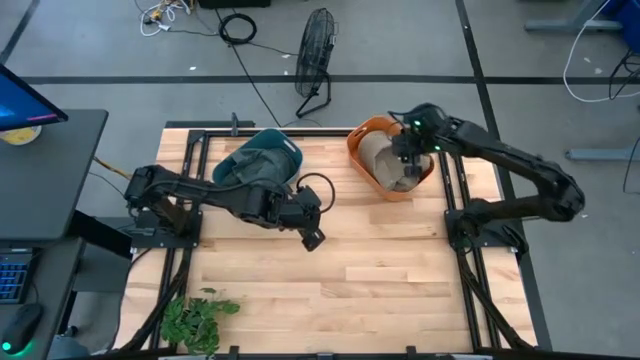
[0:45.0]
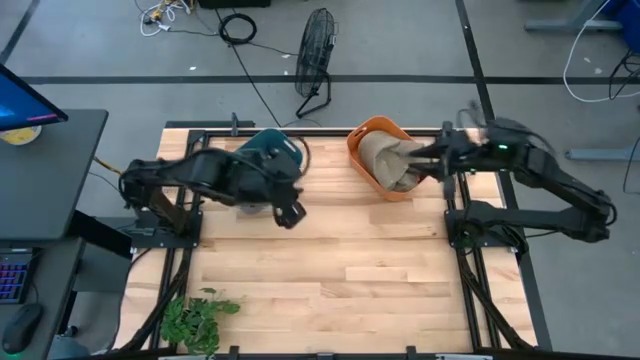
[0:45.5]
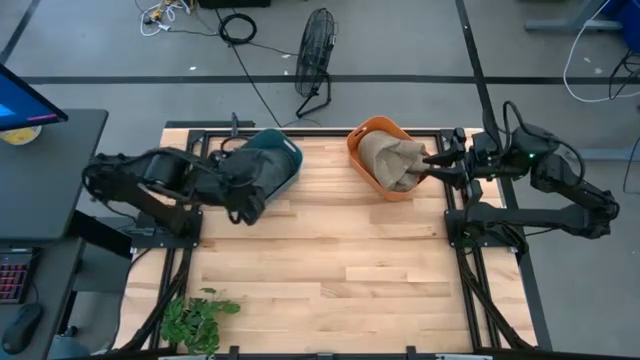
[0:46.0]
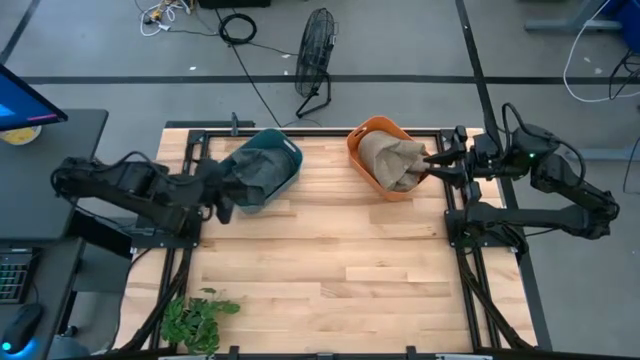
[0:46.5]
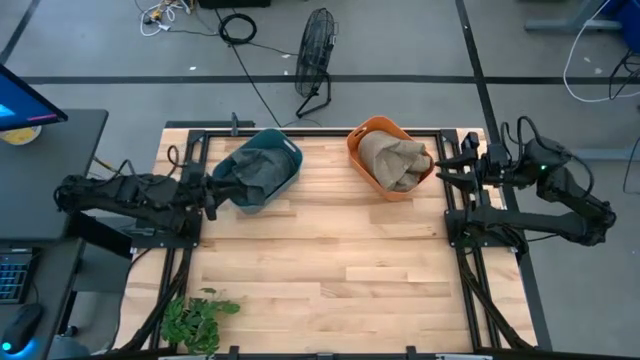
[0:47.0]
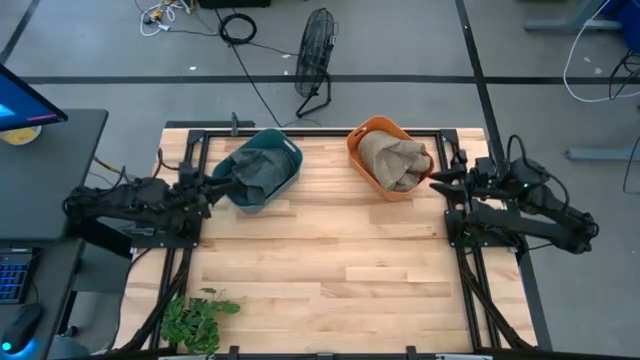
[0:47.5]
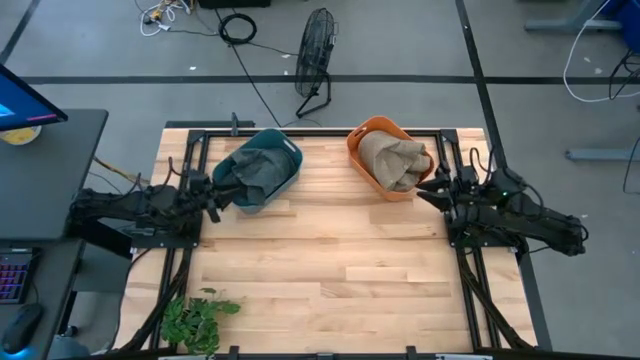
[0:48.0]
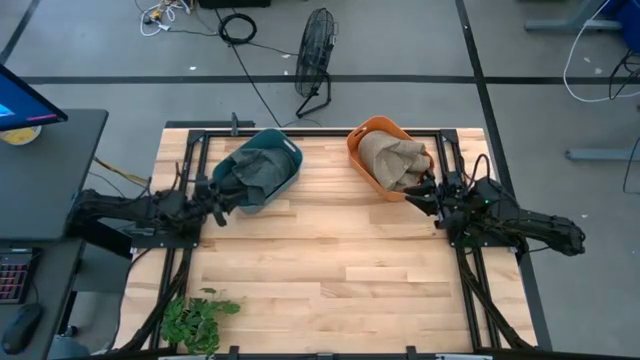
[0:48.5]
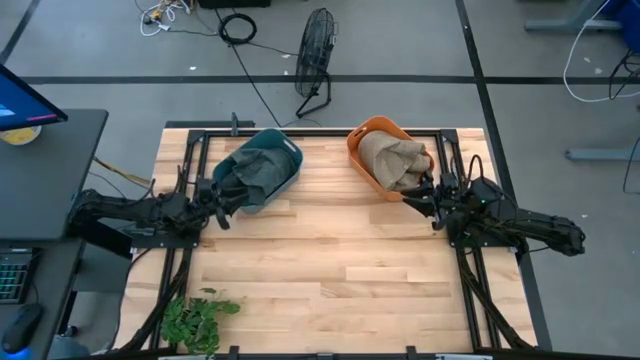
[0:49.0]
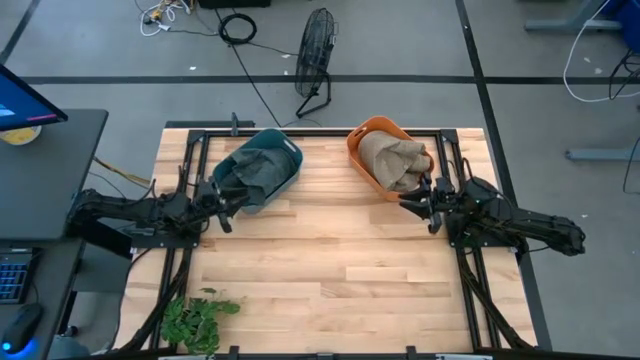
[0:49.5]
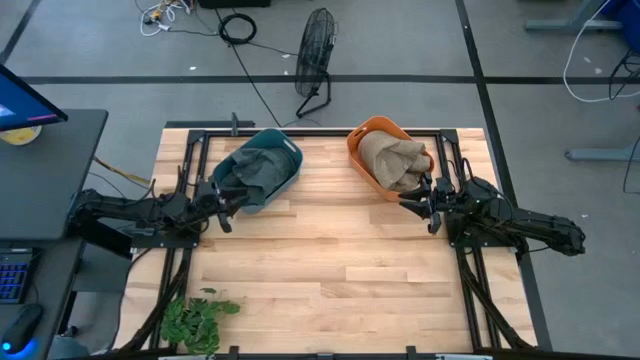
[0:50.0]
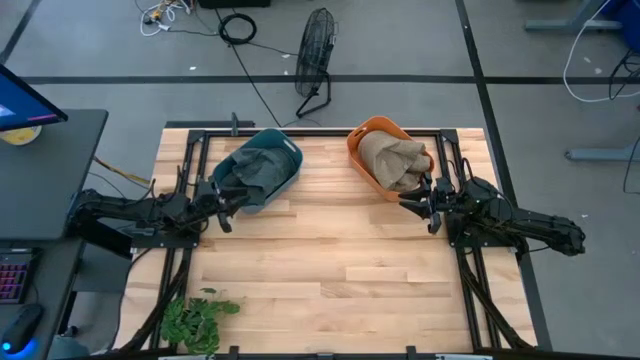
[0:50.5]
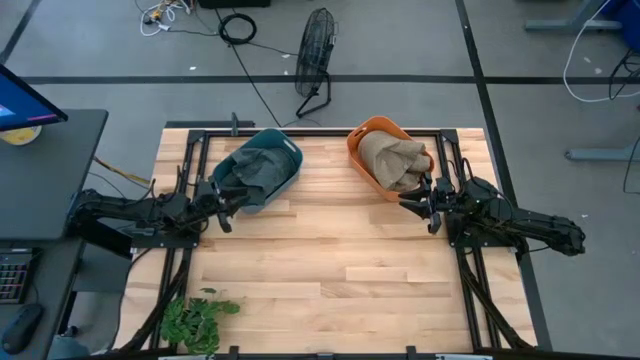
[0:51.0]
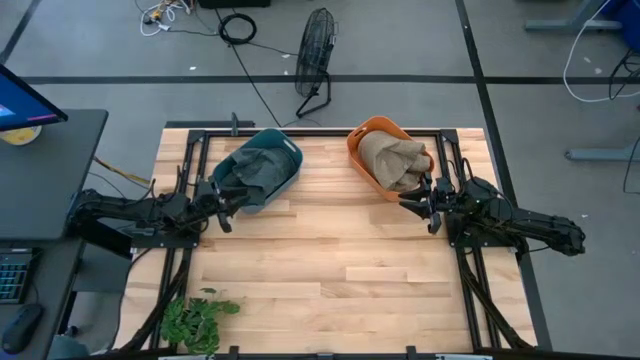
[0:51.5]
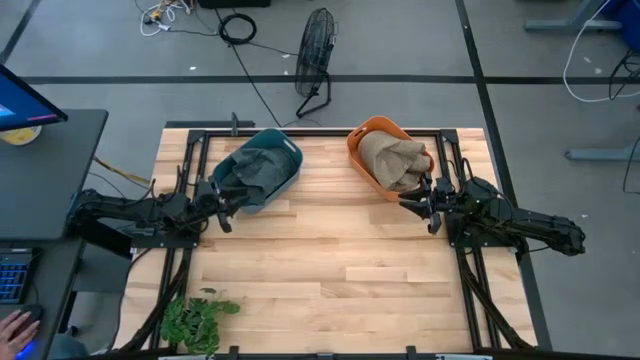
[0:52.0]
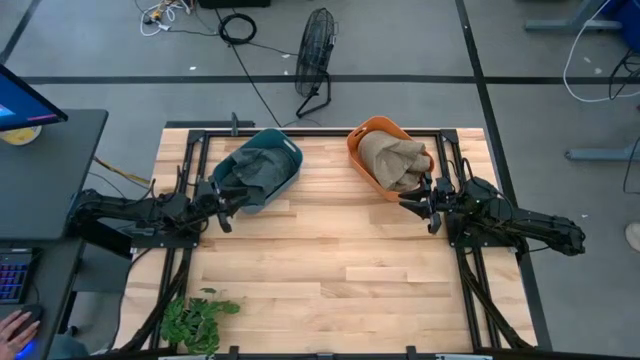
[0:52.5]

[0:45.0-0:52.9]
Task: Pick & Place hat
Return to Home Position

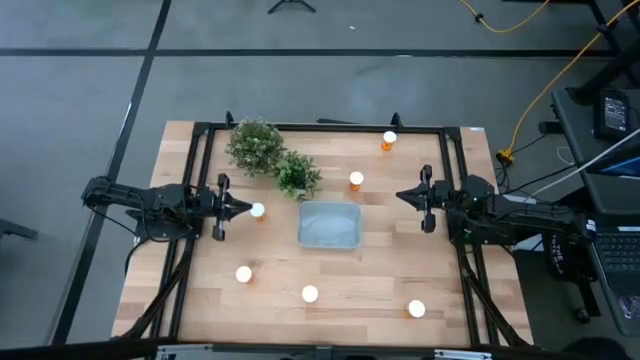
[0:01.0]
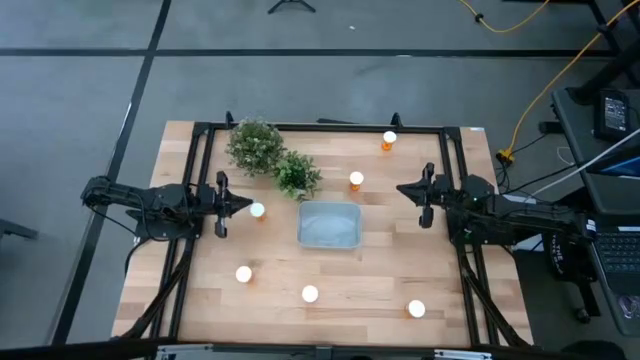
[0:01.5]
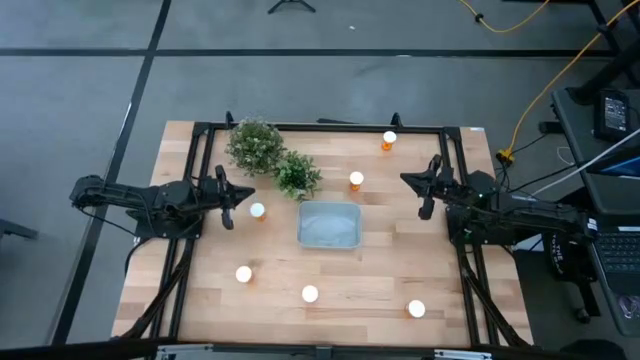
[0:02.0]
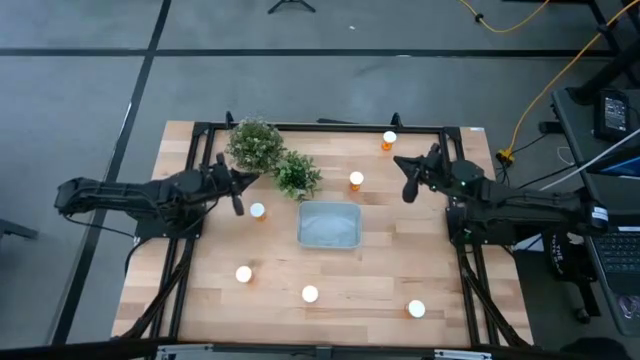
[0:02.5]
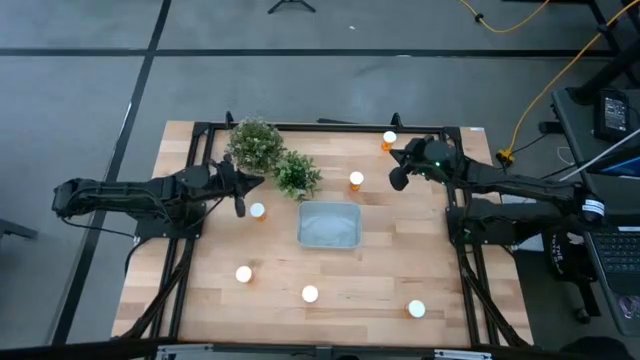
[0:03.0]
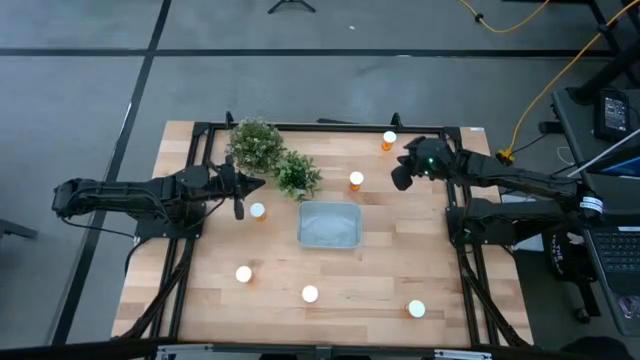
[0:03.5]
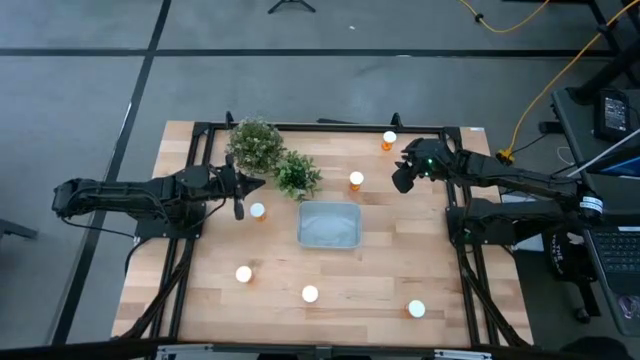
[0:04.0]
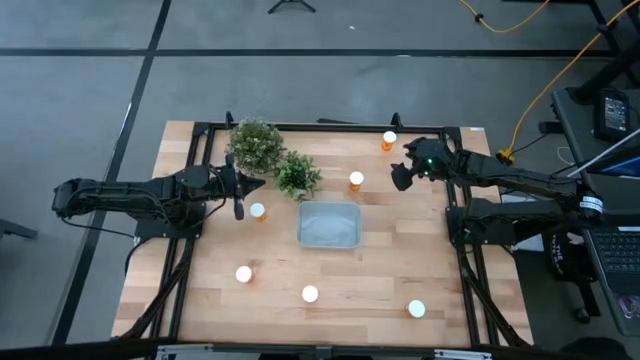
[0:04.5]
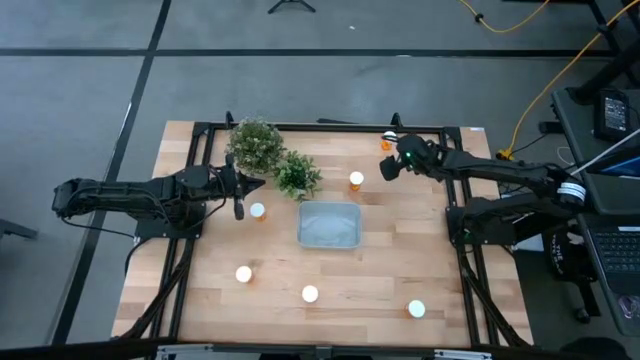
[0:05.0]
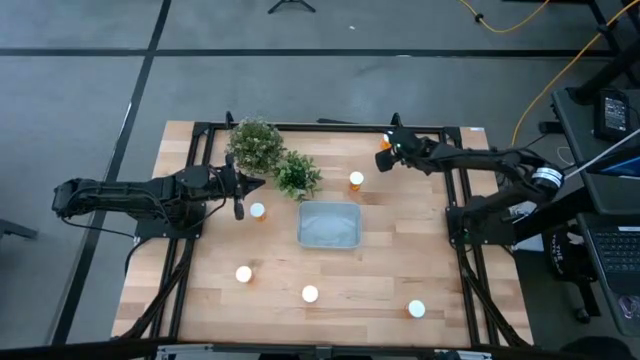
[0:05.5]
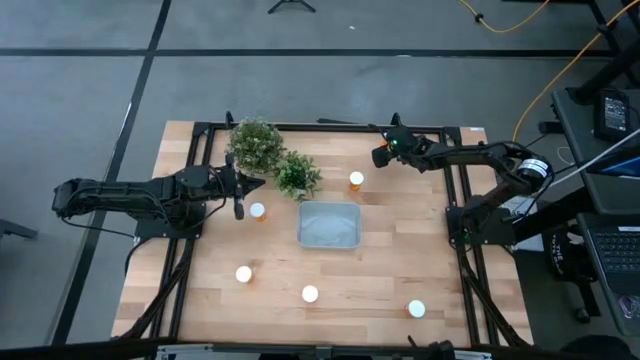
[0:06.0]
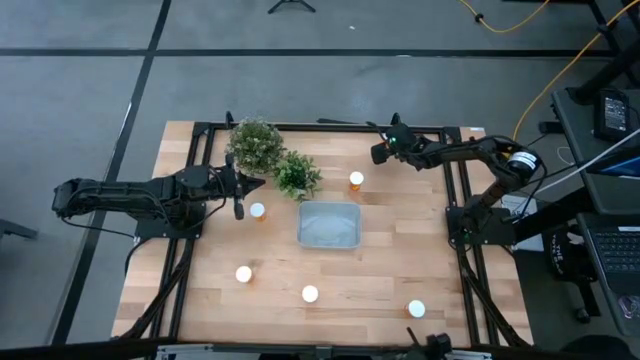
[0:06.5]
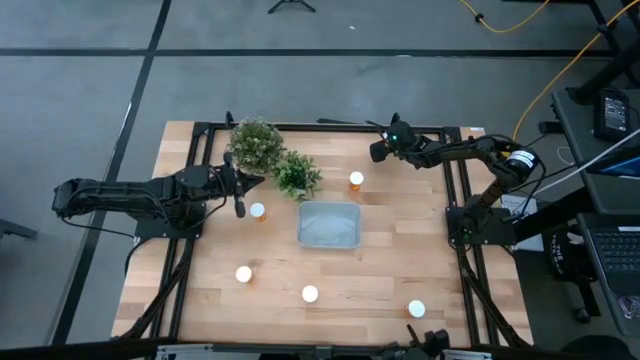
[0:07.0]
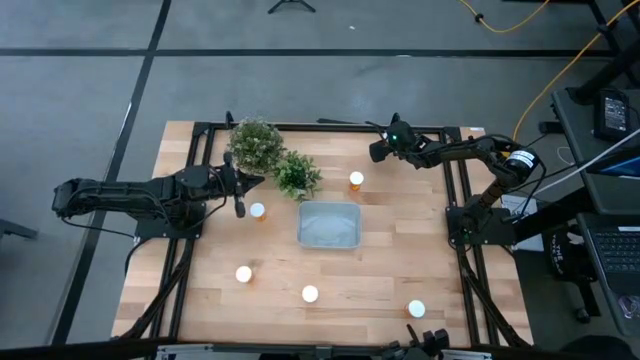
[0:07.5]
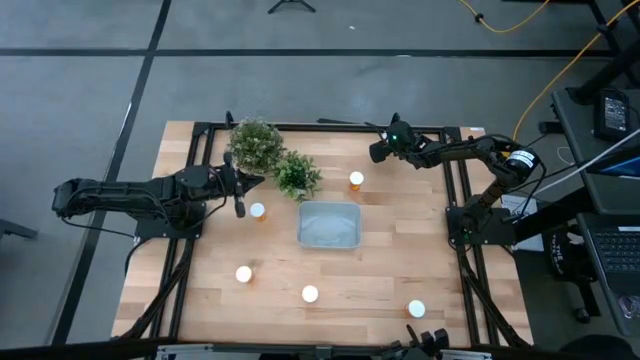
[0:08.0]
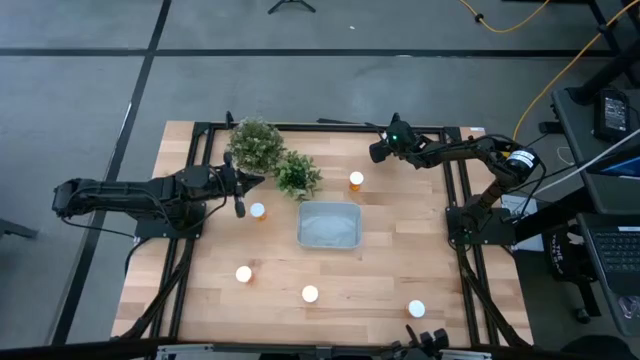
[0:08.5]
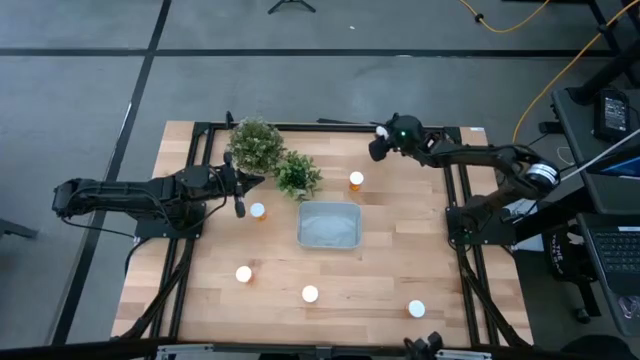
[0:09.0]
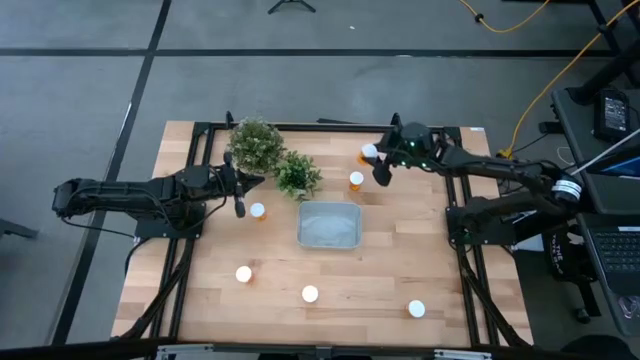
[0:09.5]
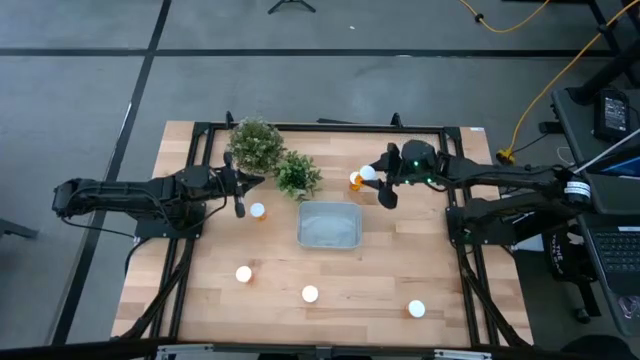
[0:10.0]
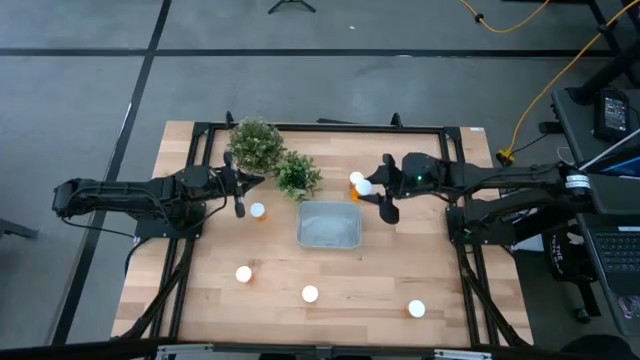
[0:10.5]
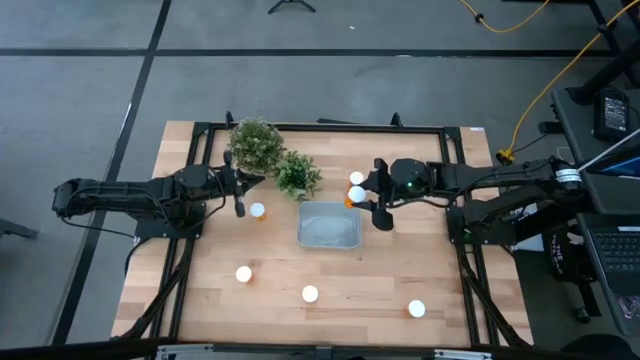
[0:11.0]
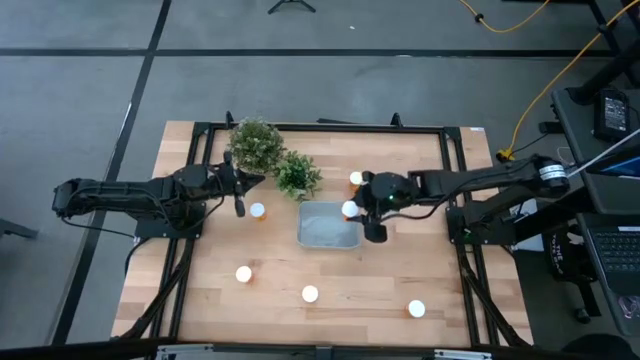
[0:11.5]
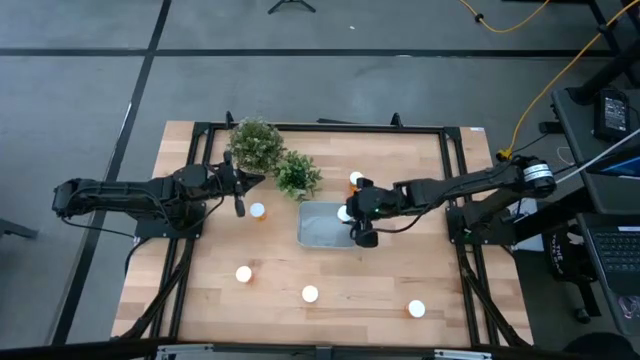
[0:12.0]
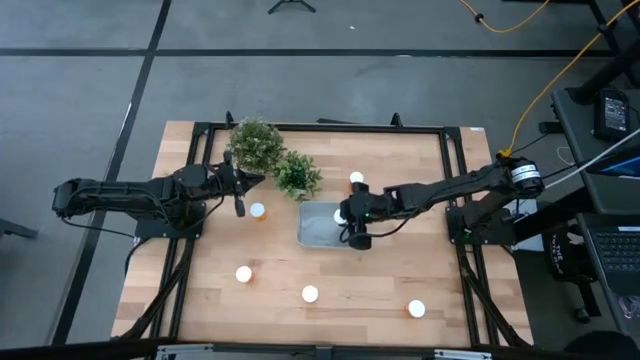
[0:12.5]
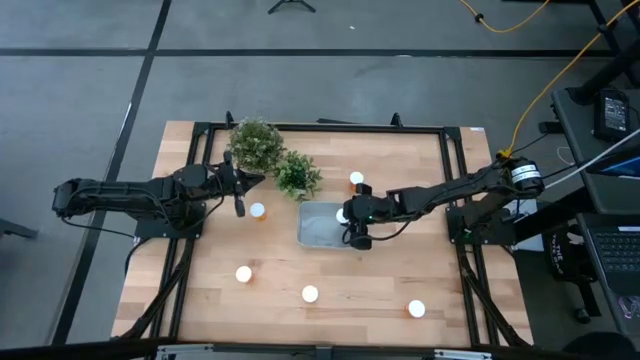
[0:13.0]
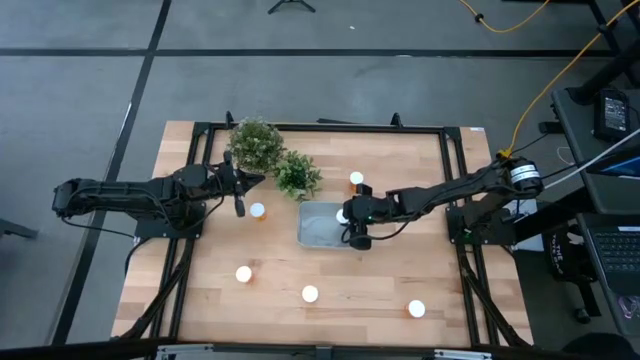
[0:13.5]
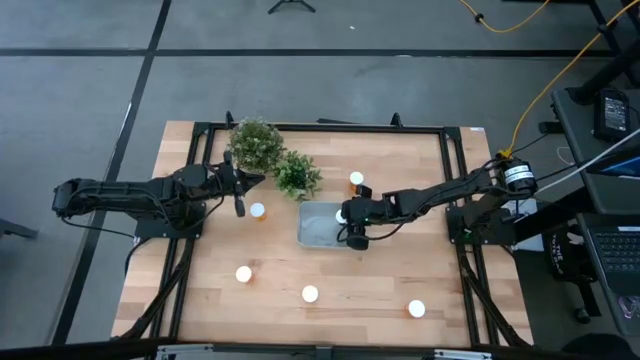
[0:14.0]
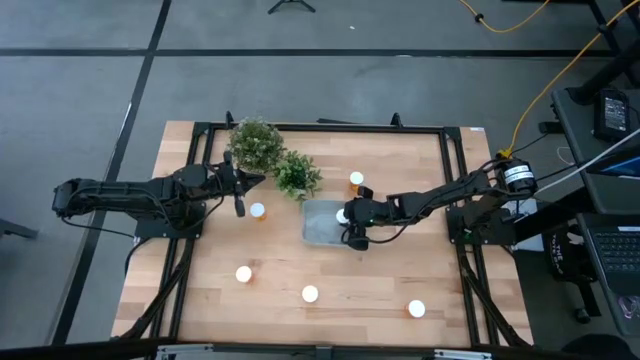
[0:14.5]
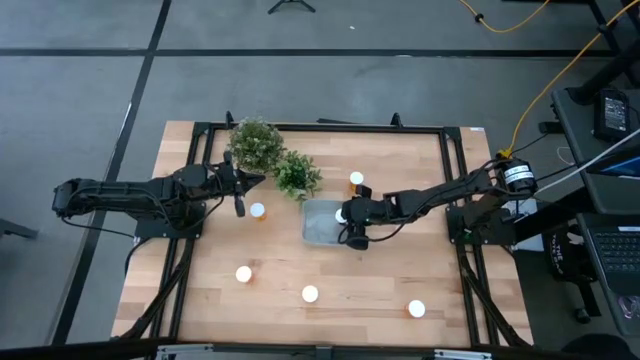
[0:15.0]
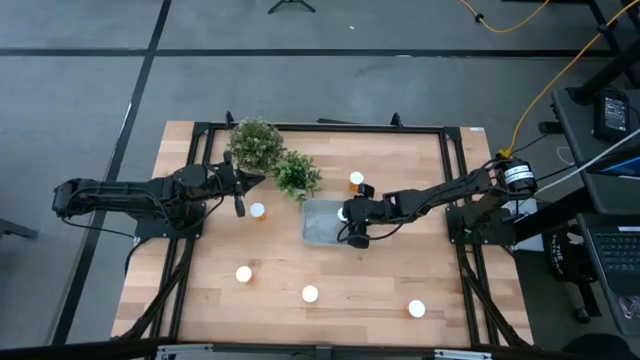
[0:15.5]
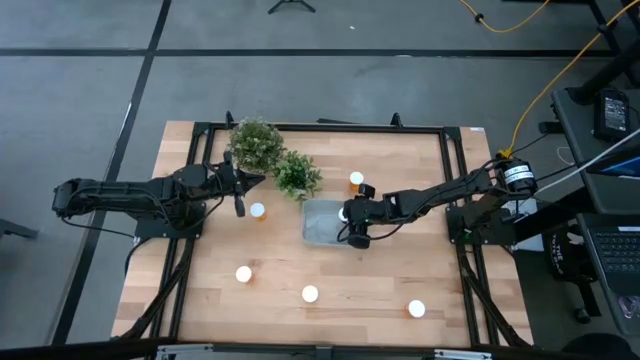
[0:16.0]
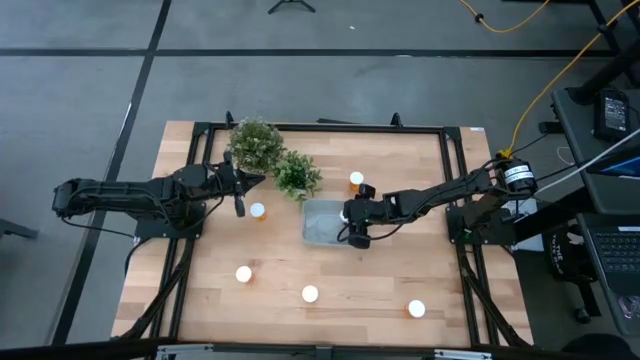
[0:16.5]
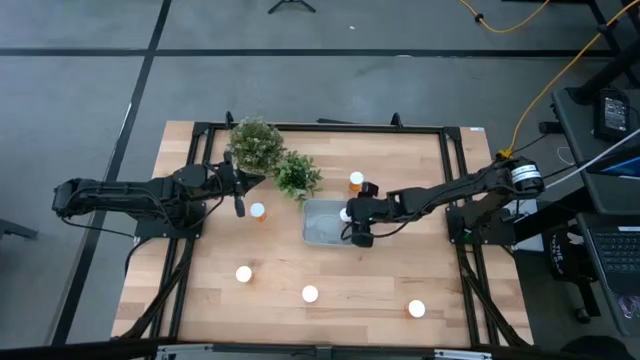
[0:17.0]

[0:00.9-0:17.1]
Task: Pick and place pill bottles into a basket
Put the orange pill bottle into the grey bin
